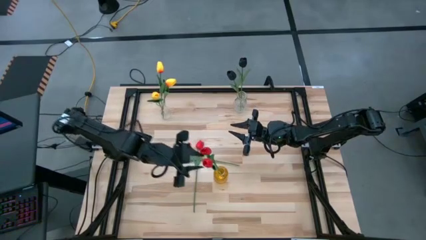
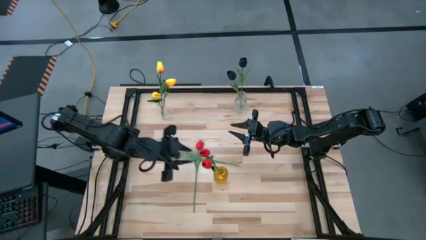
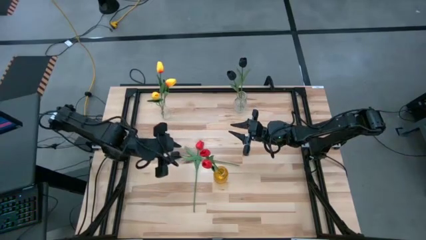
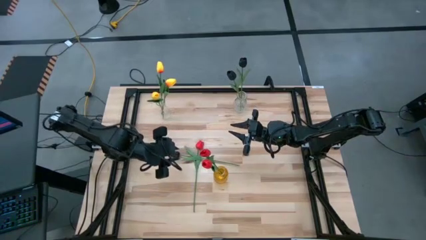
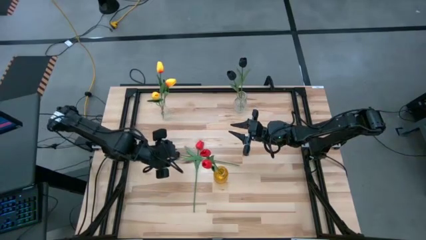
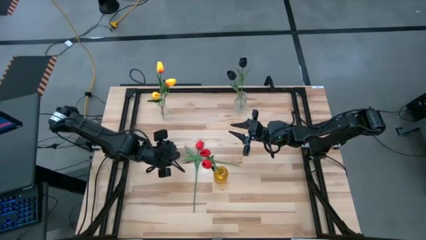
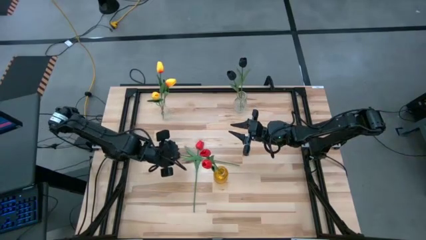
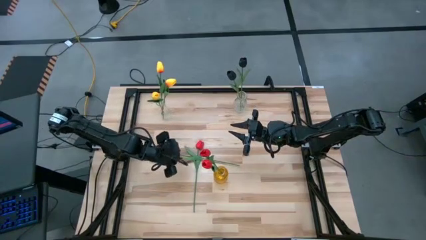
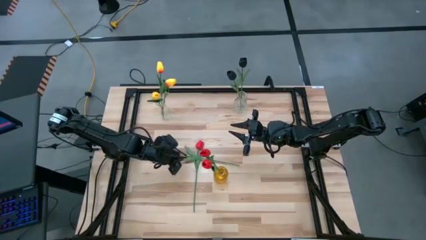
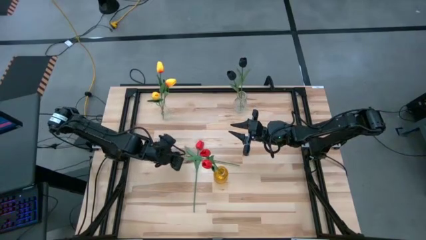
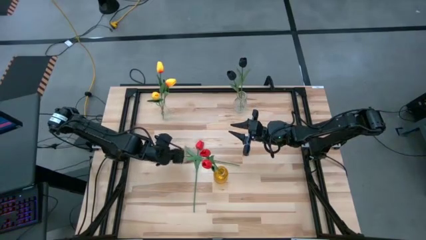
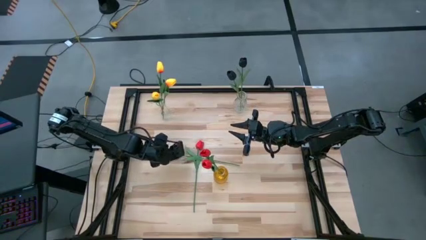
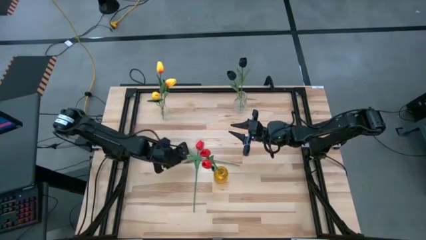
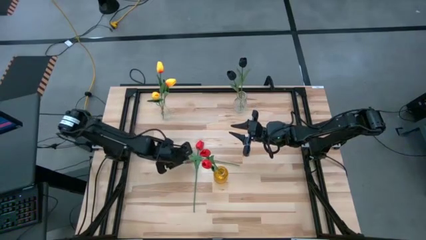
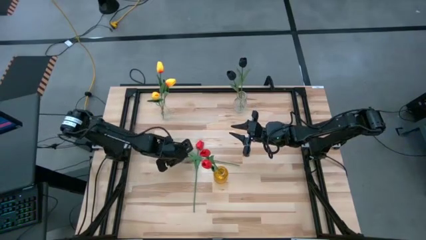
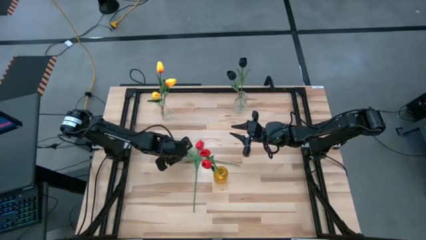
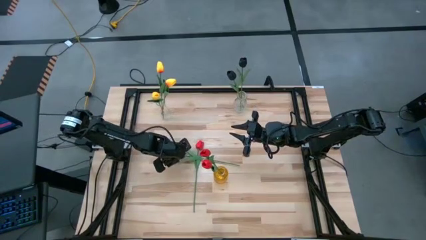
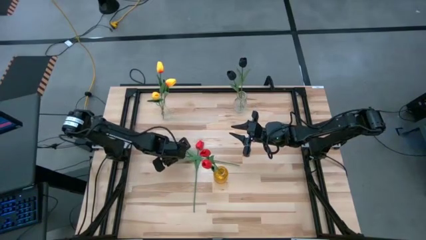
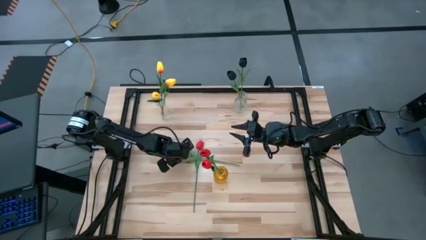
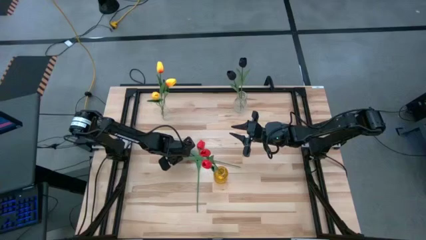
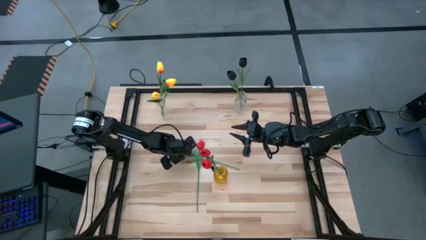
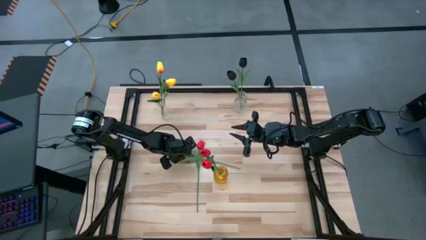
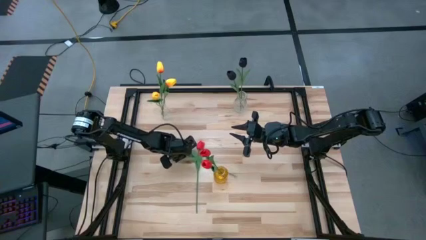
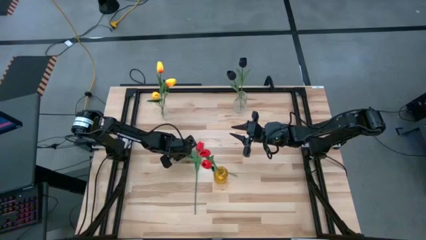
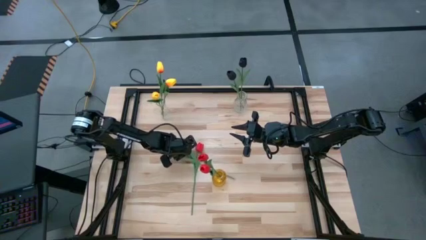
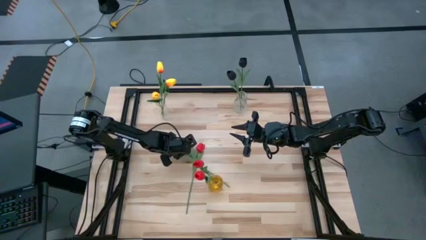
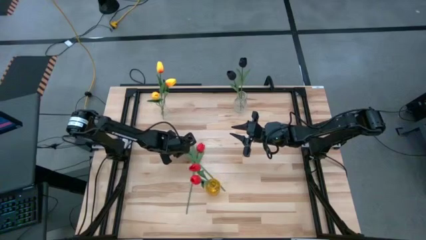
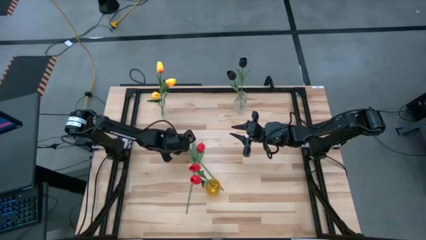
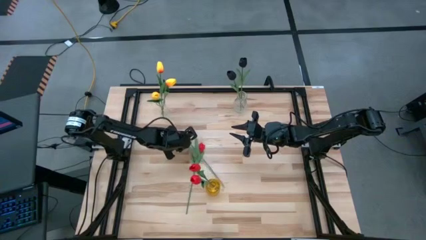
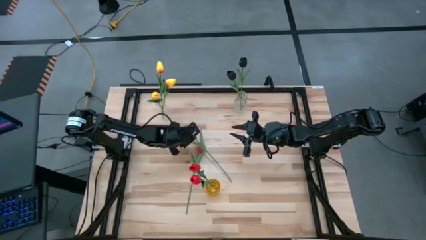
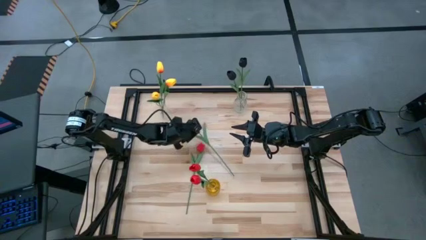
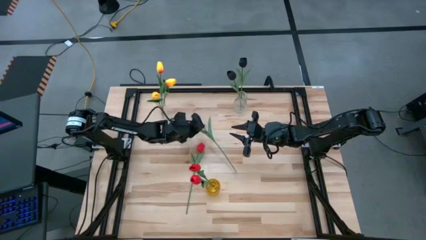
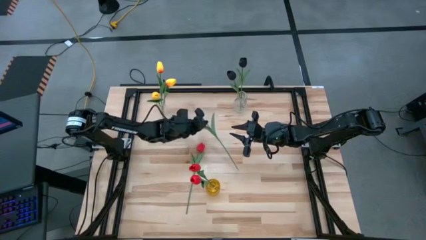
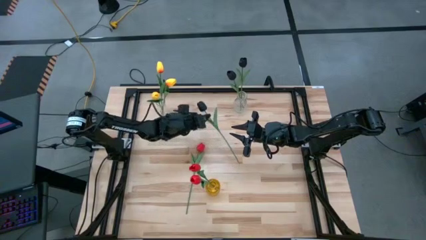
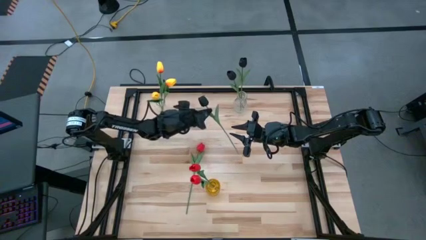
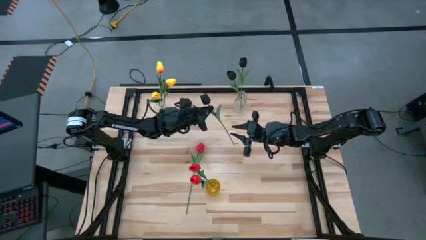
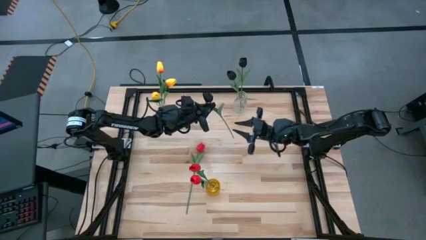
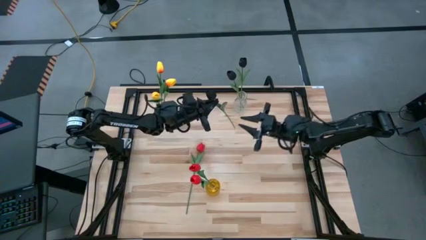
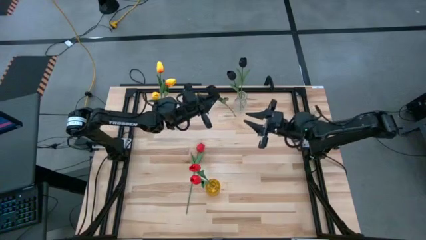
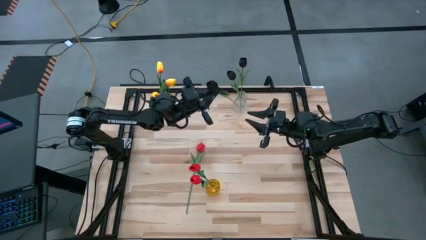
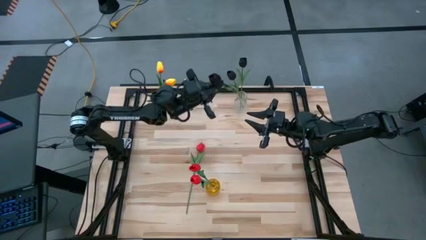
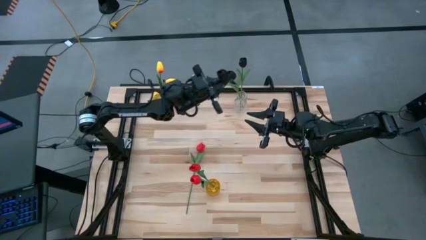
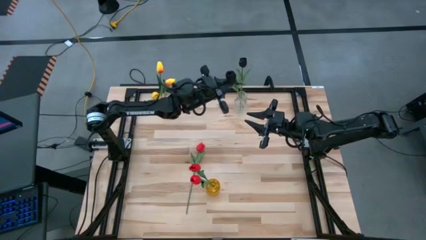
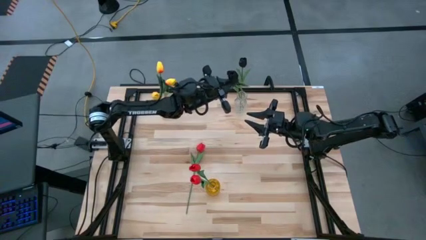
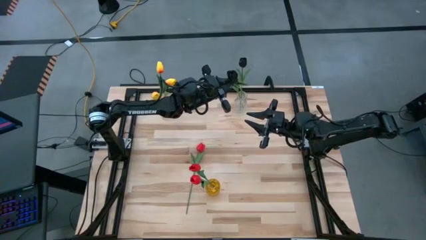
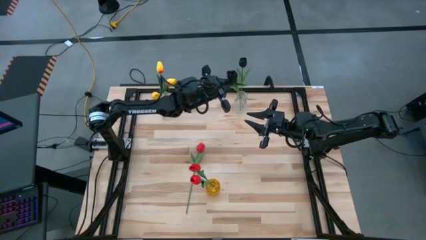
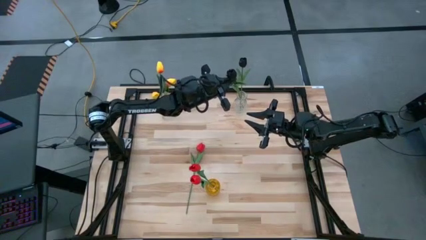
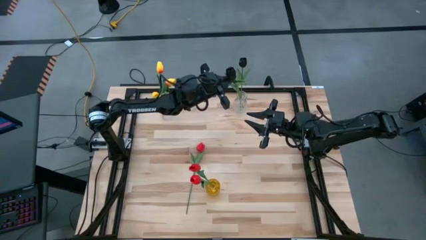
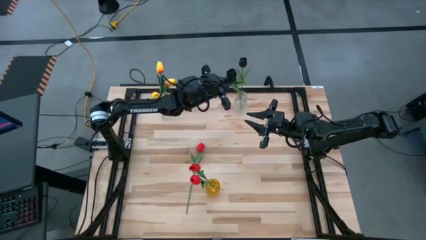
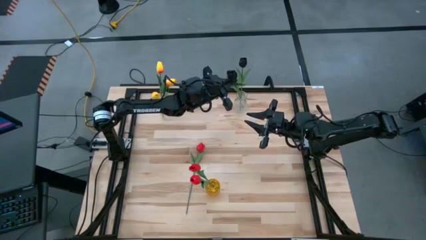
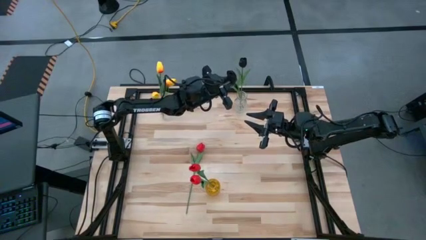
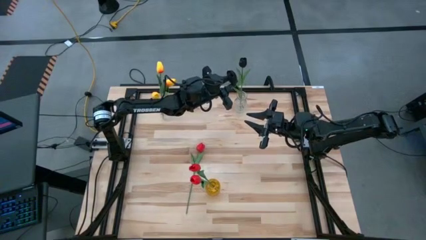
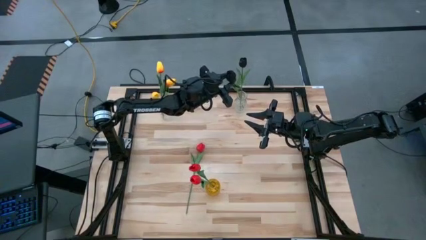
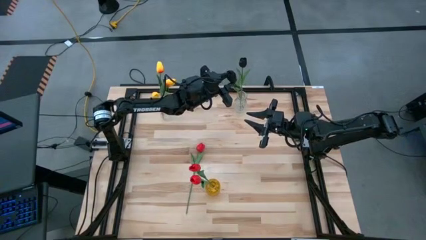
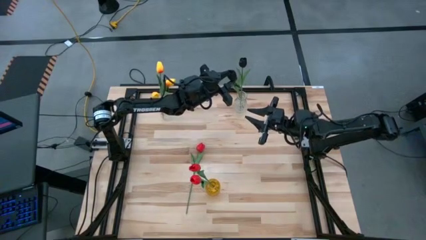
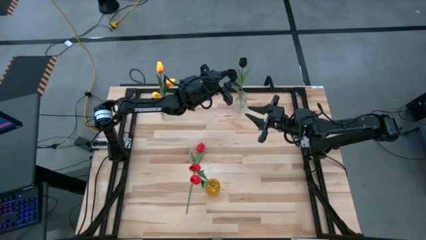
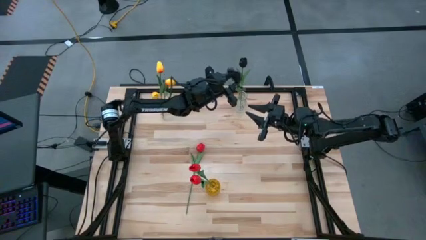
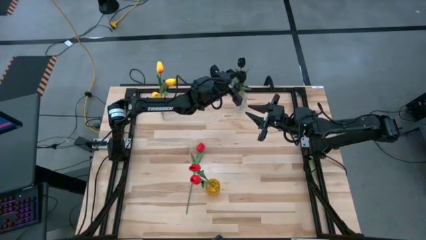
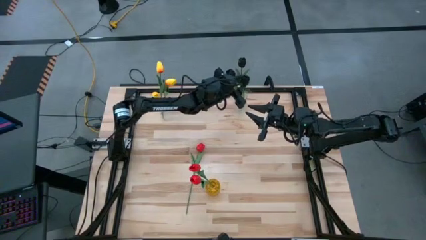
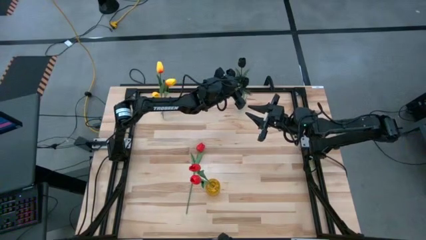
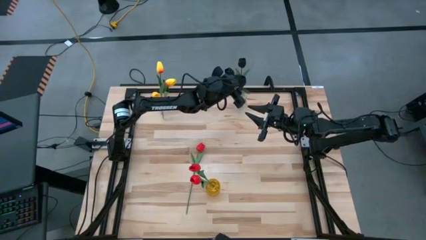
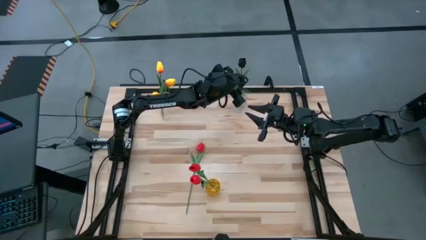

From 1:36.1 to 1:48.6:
Task: Sort flowers into vase by color
Put the black flower into the right transparent vase
